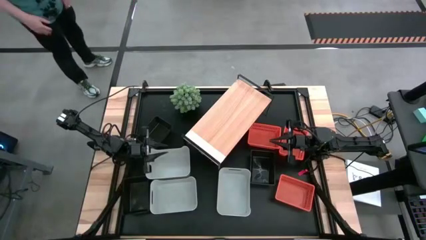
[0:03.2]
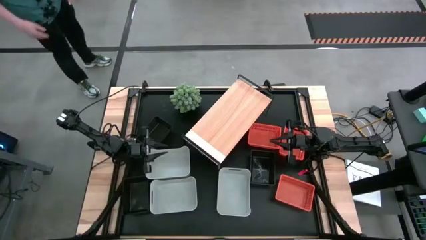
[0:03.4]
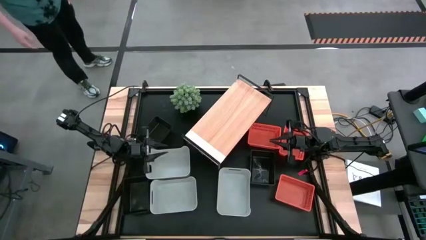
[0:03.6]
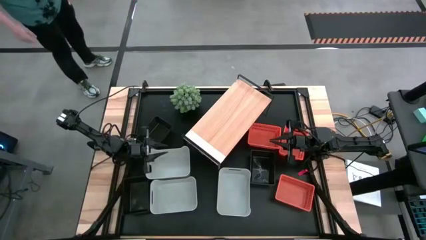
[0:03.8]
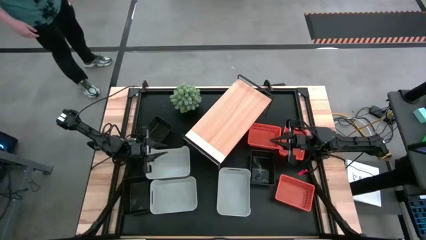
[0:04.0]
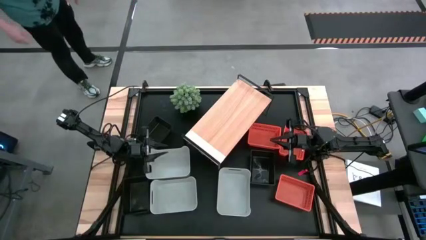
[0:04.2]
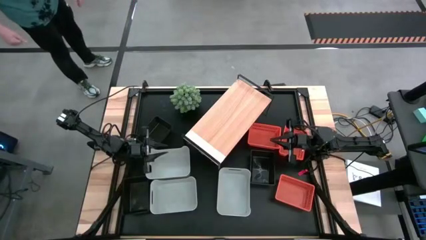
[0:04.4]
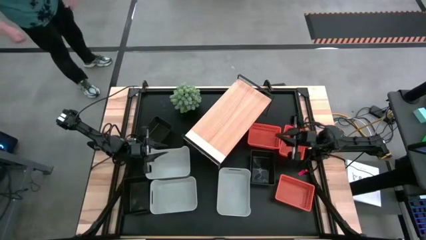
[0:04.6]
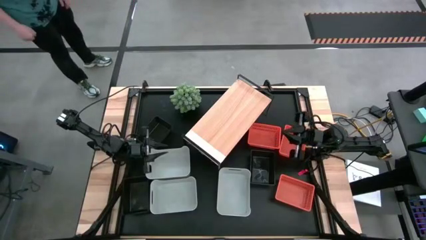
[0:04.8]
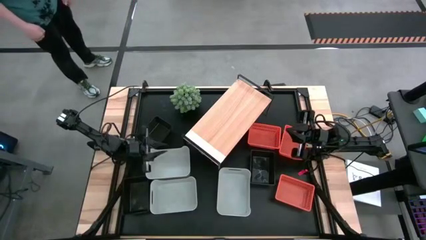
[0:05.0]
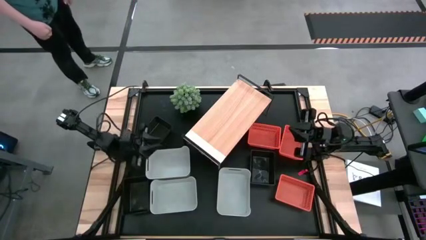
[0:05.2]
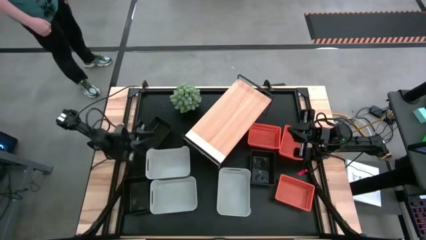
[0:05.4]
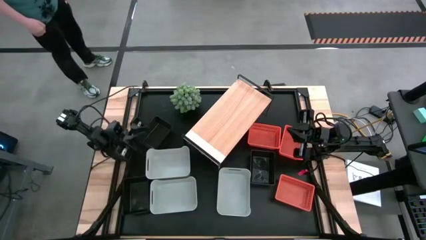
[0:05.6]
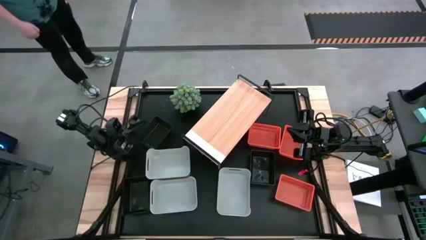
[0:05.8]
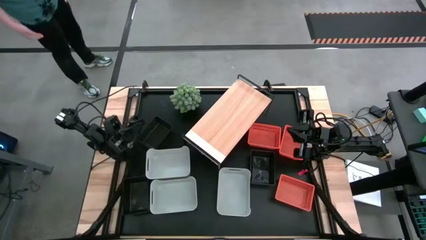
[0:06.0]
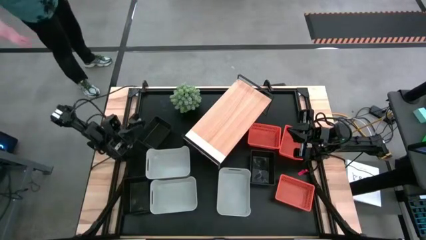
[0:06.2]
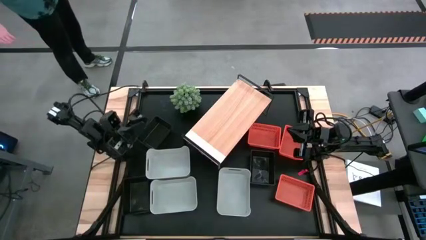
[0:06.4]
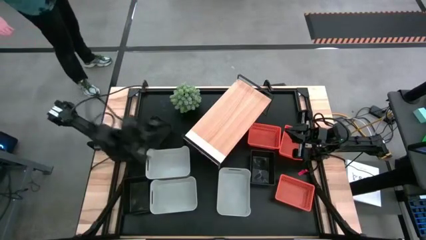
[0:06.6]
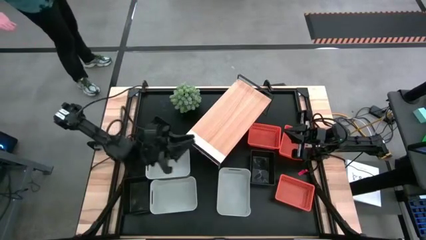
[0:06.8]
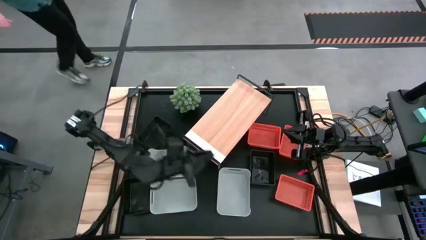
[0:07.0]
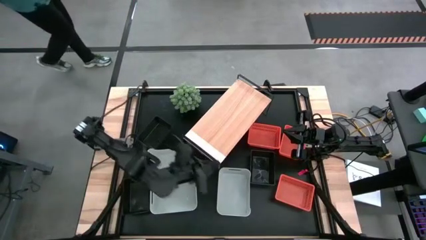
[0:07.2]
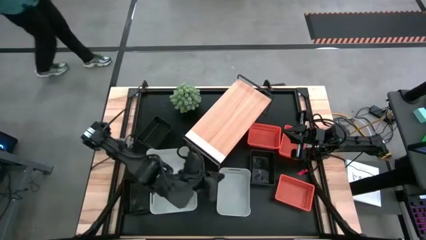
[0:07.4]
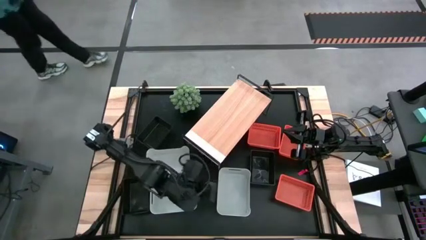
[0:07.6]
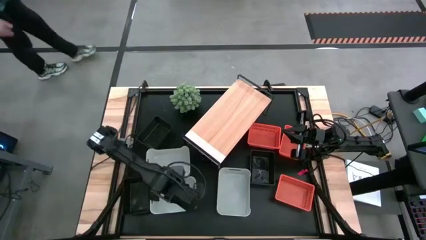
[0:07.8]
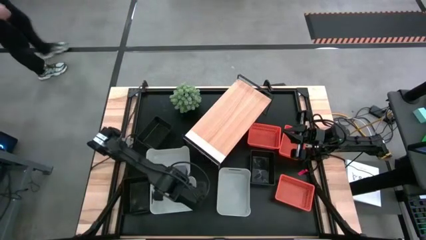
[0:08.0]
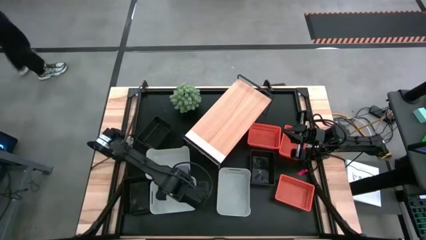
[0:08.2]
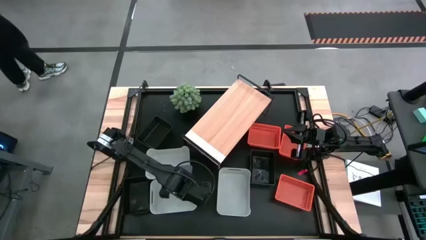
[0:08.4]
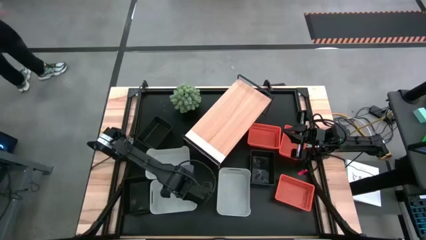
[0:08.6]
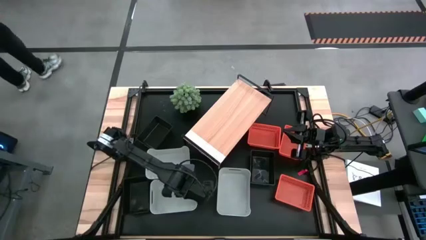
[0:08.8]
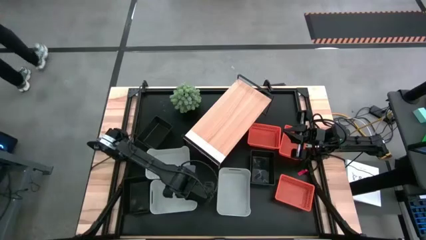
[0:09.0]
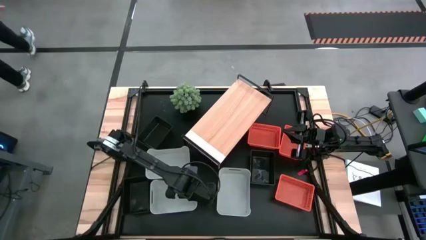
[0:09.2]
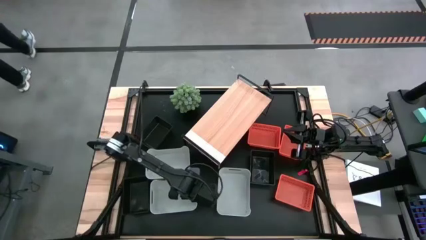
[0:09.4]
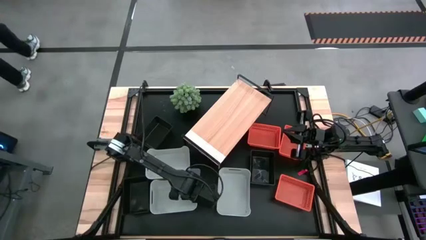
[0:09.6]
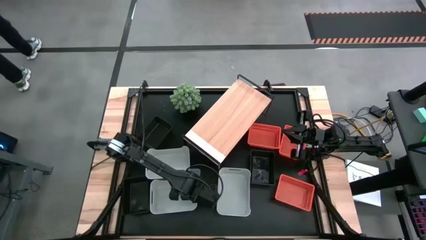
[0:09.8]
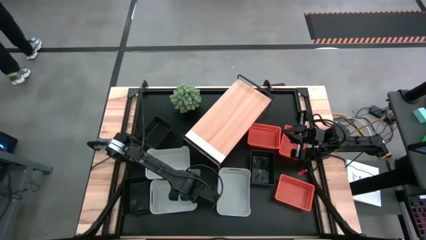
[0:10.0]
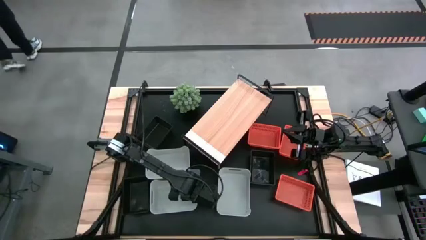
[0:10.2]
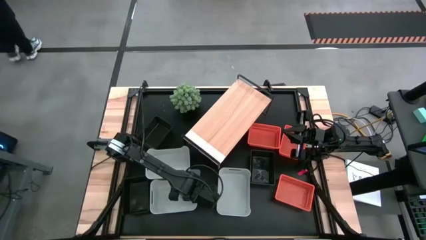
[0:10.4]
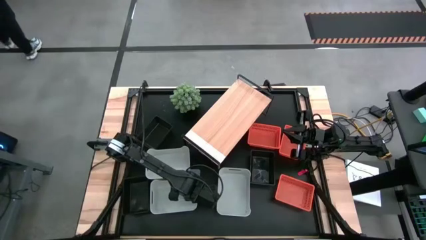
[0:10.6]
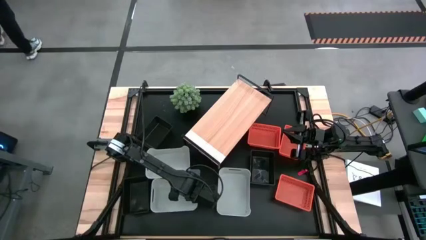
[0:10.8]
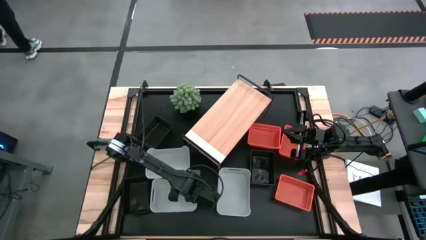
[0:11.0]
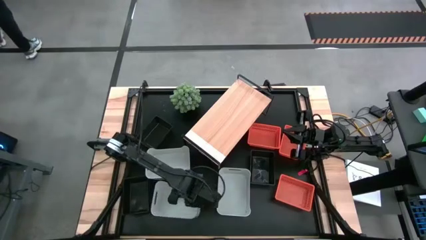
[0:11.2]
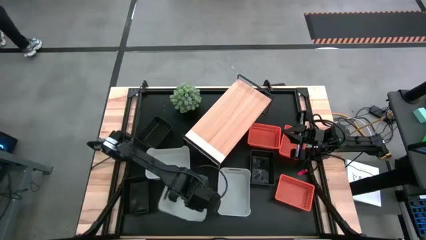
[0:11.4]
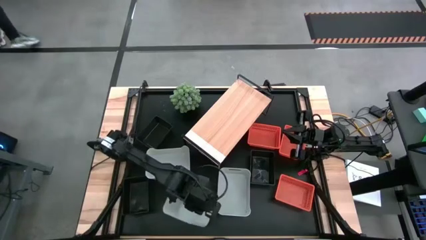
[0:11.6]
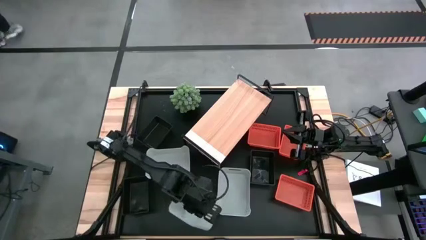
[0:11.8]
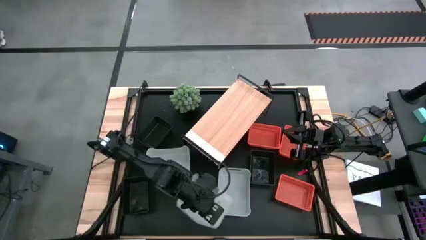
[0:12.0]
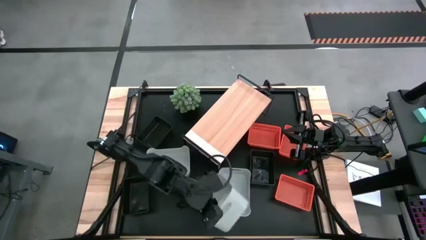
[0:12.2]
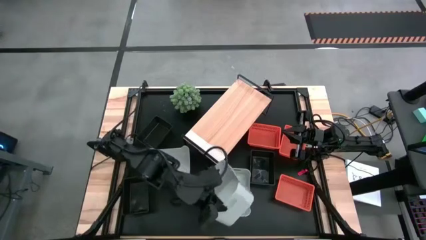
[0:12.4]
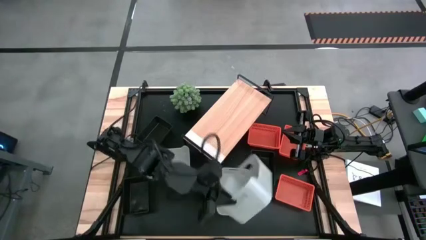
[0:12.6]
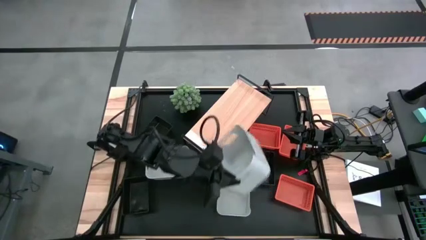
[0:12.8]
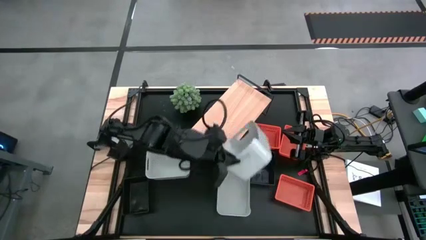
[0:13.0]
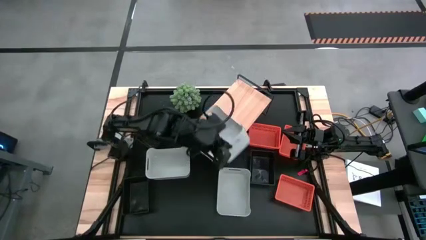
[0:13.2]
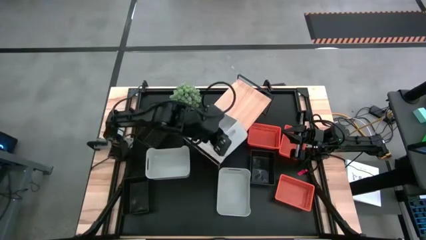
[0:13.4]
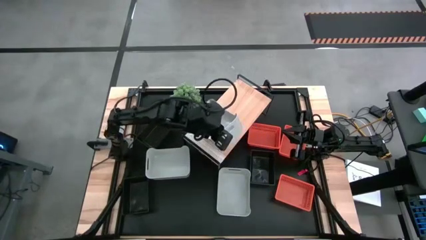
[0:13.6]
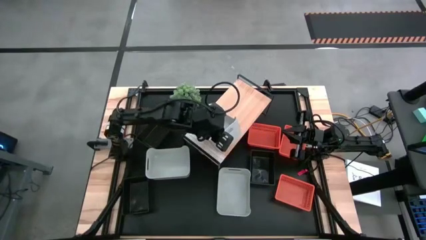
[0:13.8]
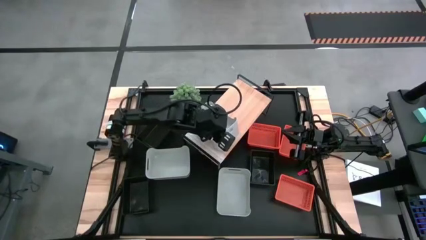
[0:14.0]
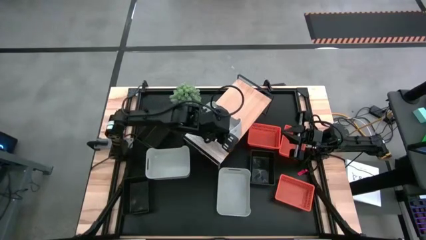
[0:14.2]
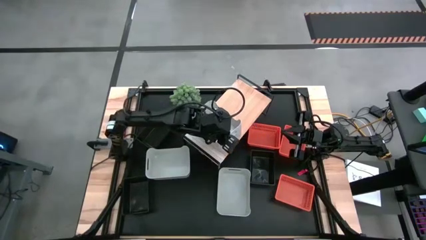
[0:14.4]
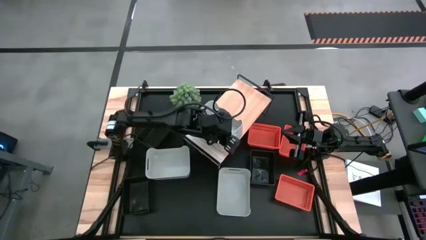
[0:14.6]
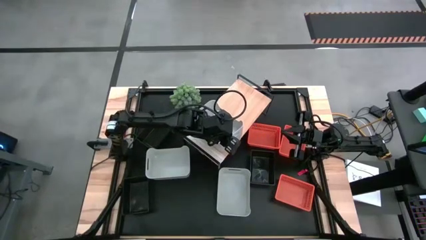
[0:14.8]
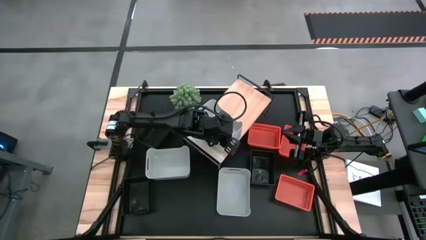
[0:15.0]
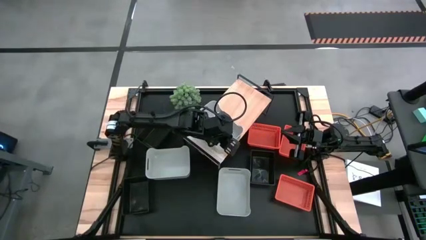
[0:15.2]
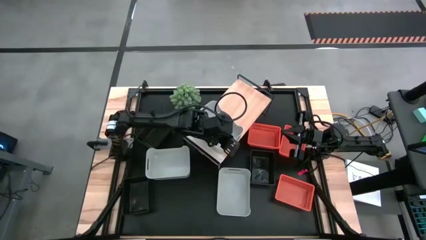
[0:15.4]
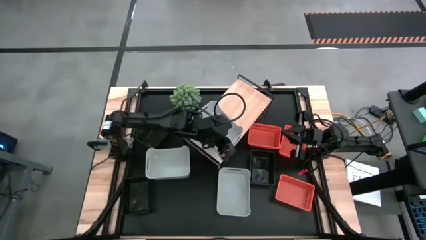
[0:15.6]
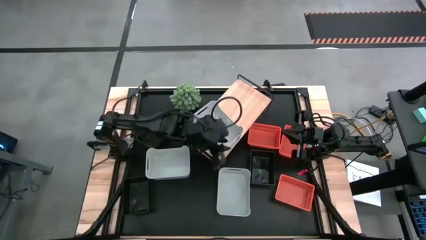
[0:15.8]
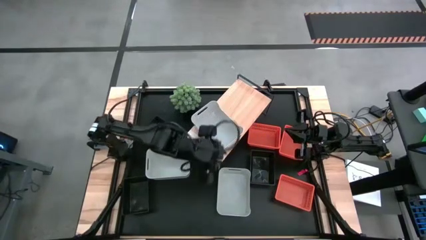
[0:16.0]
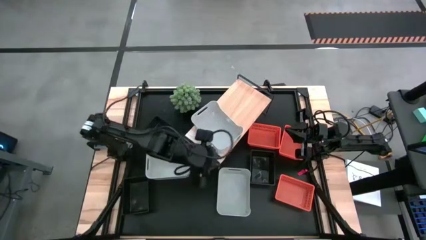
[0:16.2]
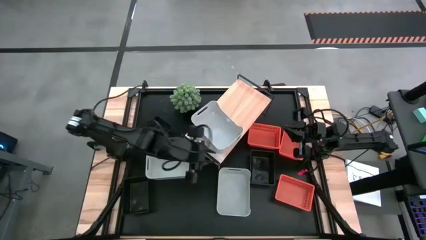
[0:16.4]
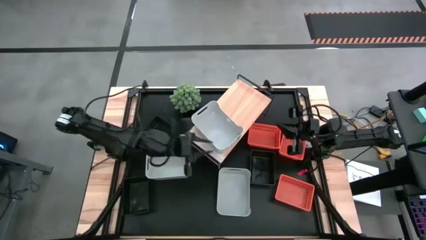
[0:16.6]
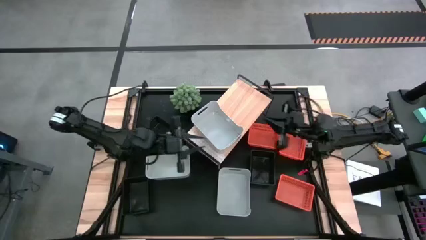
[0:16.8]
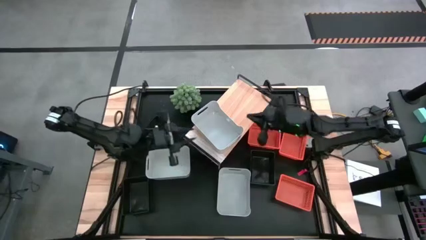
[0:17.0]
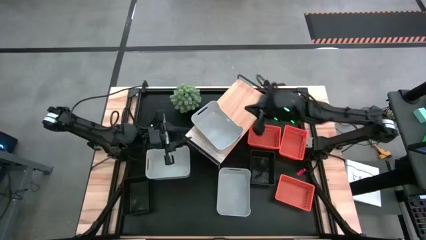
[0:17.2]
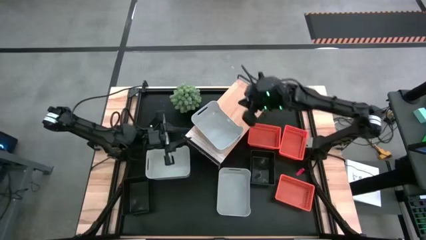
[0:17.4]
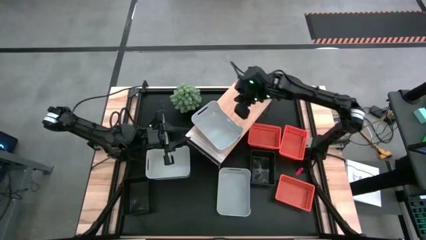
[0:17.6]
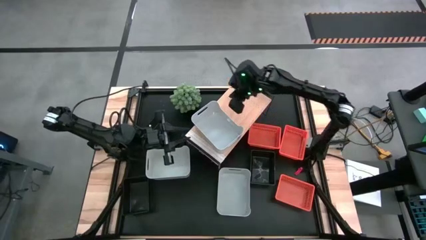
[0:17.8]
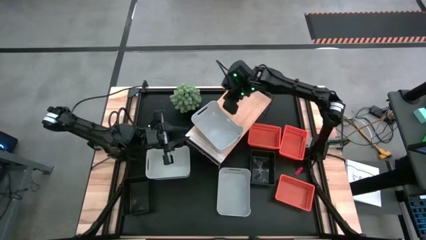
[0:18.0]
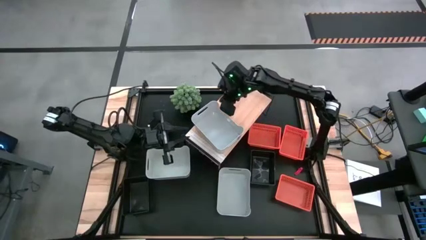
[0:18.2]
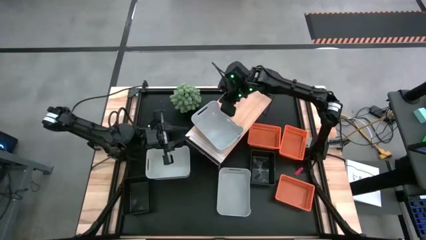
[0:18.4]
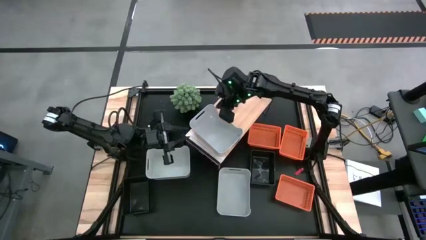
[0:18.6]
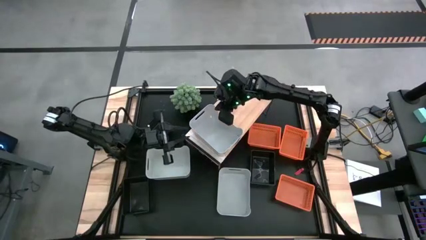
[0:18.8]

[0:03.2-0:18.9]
Task: Stack baskets on shelf by color
Put the bottom left gray bin on the shelf
